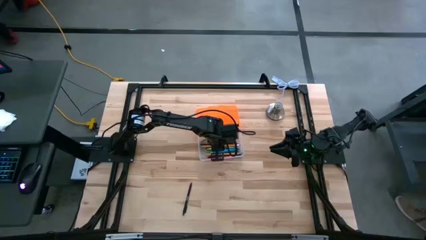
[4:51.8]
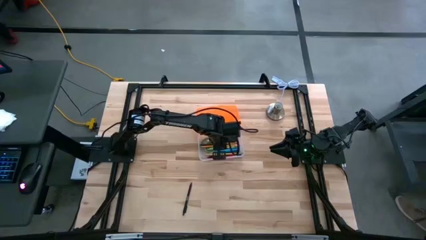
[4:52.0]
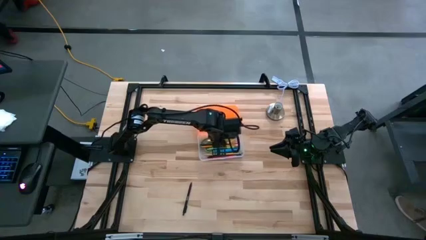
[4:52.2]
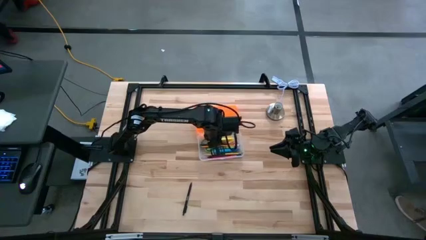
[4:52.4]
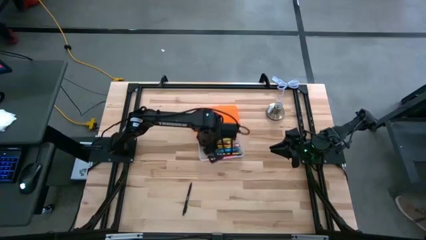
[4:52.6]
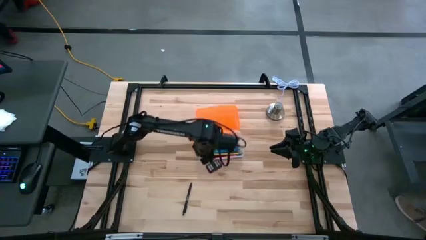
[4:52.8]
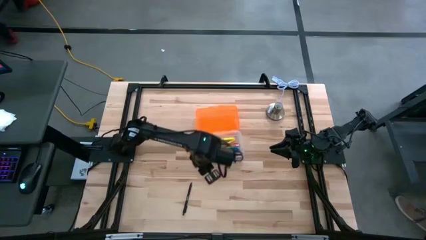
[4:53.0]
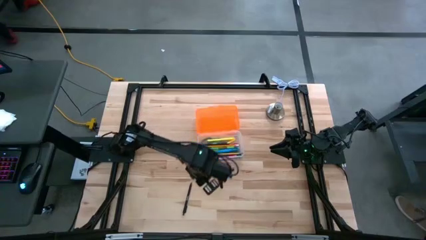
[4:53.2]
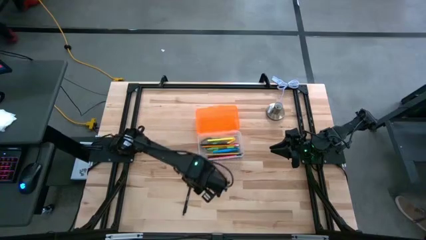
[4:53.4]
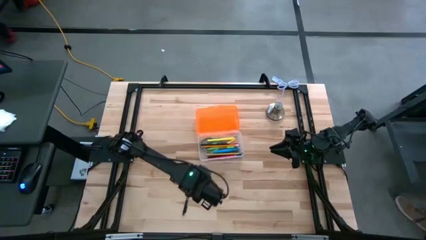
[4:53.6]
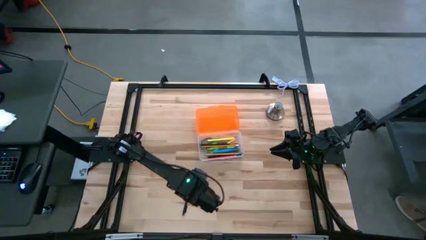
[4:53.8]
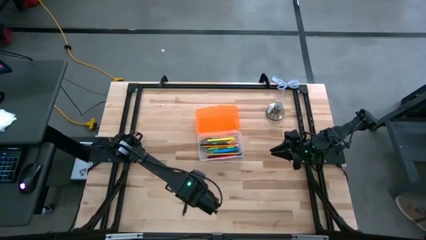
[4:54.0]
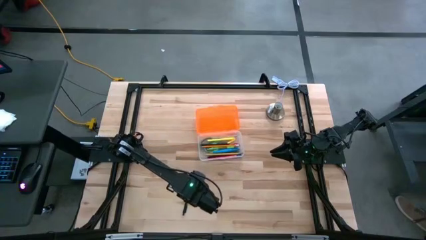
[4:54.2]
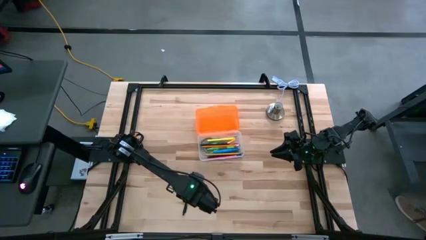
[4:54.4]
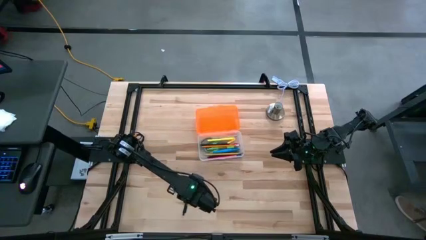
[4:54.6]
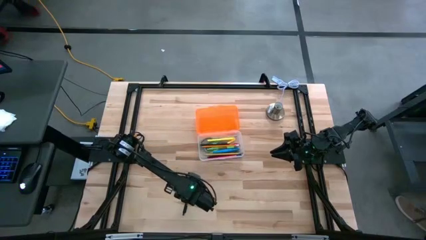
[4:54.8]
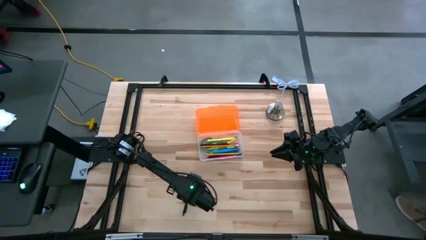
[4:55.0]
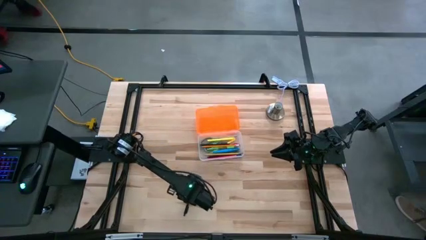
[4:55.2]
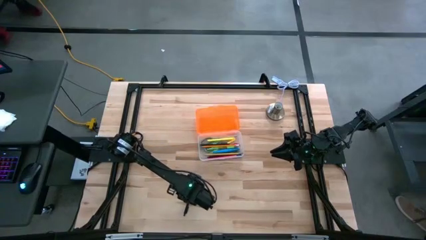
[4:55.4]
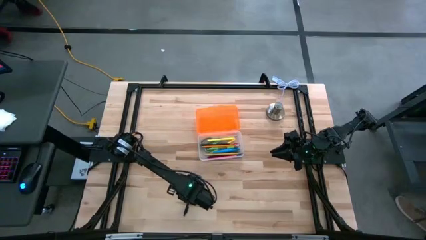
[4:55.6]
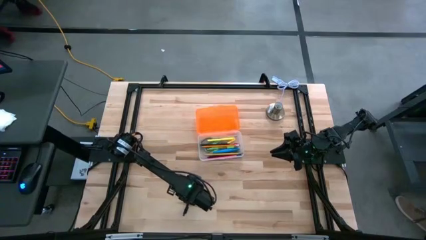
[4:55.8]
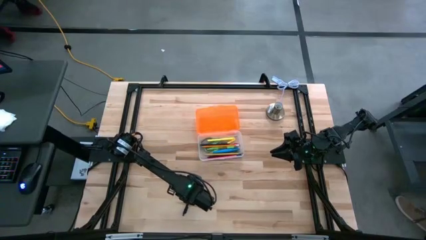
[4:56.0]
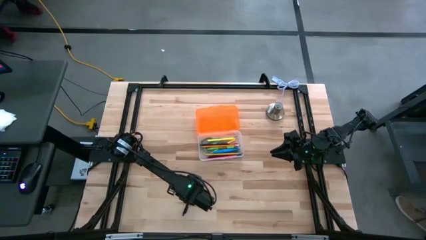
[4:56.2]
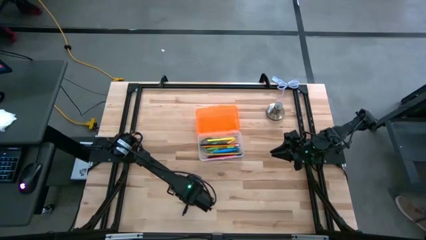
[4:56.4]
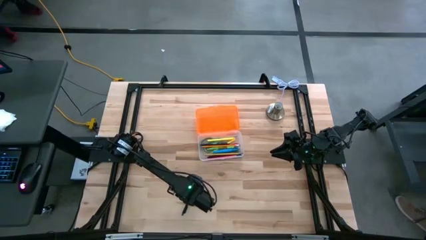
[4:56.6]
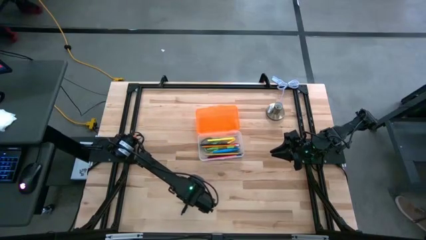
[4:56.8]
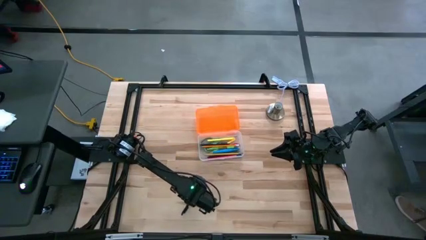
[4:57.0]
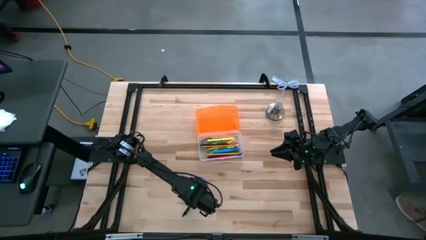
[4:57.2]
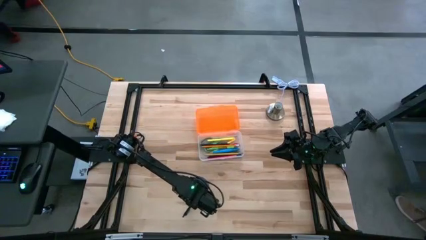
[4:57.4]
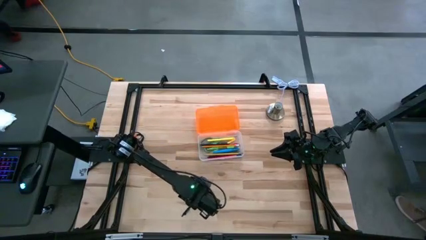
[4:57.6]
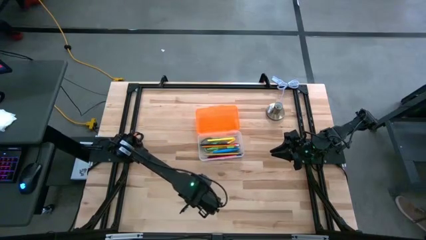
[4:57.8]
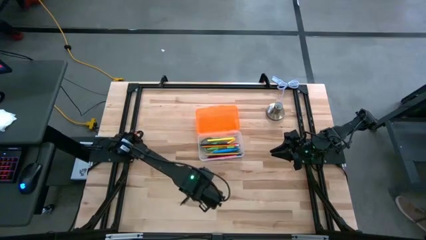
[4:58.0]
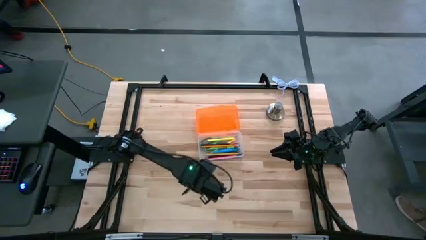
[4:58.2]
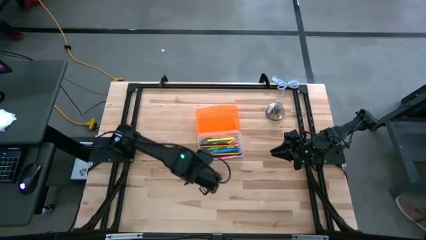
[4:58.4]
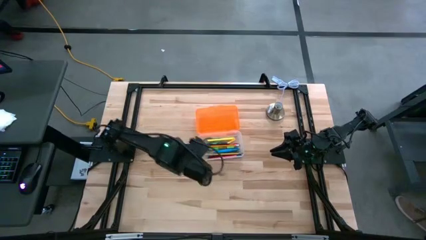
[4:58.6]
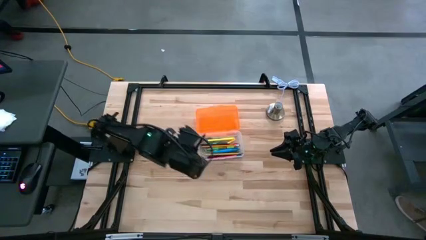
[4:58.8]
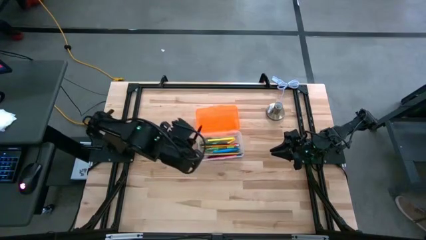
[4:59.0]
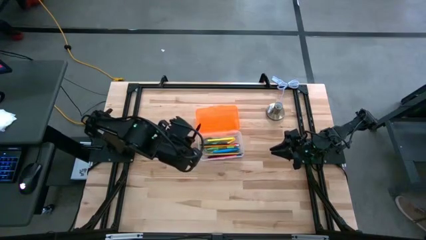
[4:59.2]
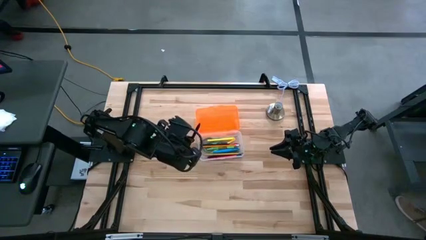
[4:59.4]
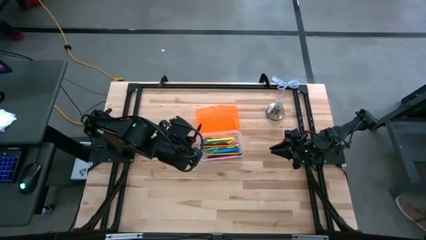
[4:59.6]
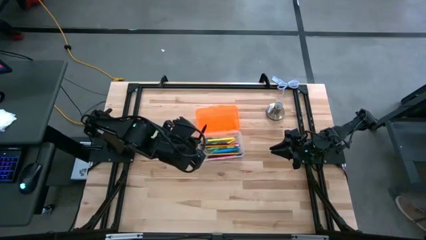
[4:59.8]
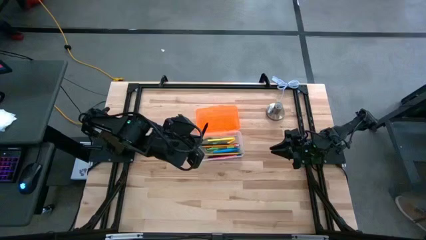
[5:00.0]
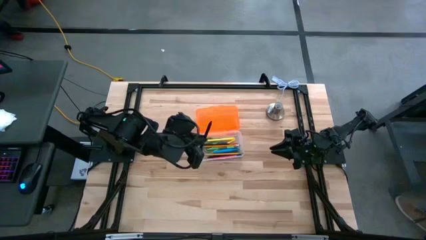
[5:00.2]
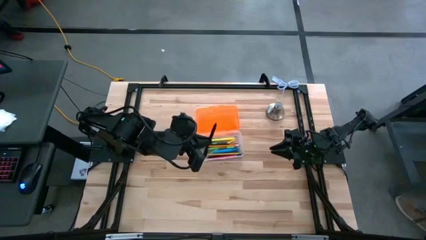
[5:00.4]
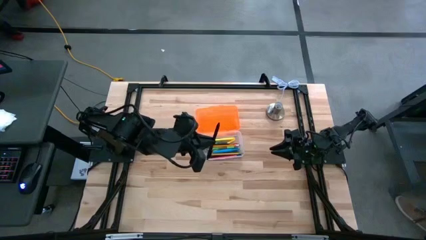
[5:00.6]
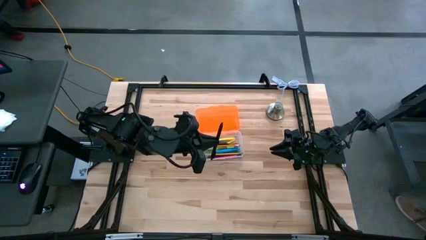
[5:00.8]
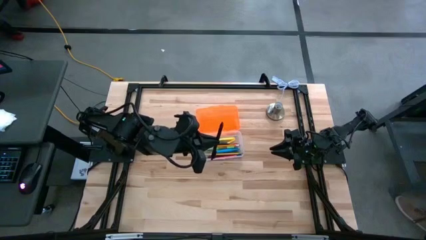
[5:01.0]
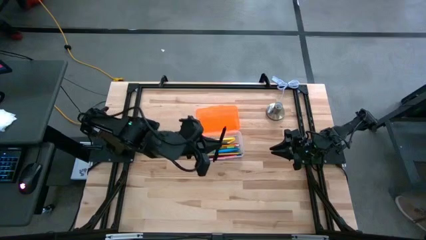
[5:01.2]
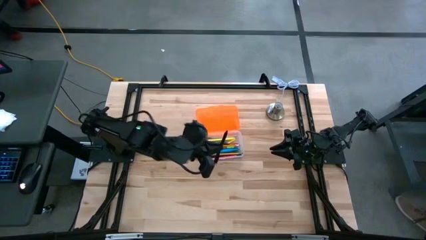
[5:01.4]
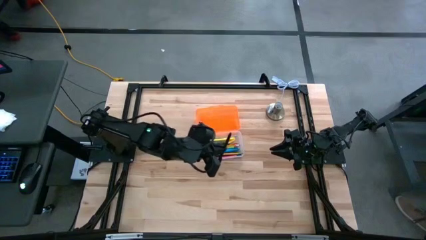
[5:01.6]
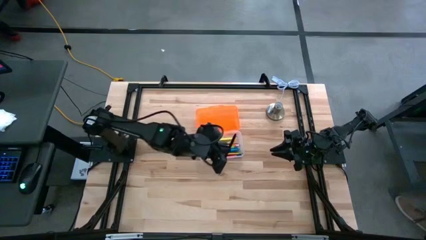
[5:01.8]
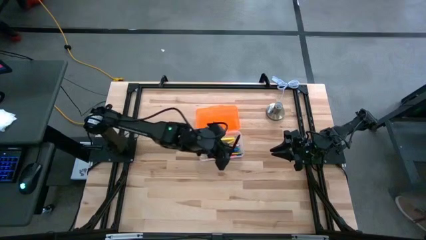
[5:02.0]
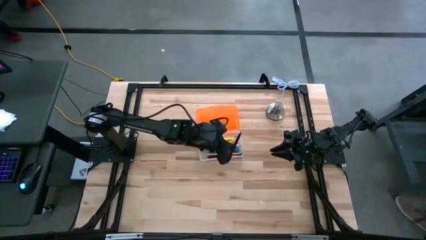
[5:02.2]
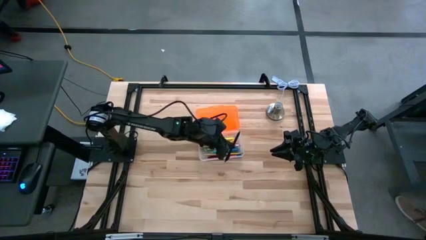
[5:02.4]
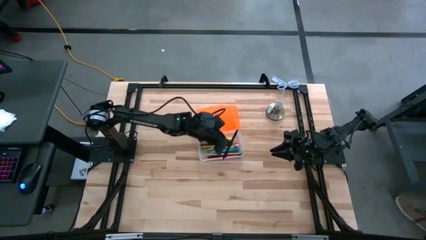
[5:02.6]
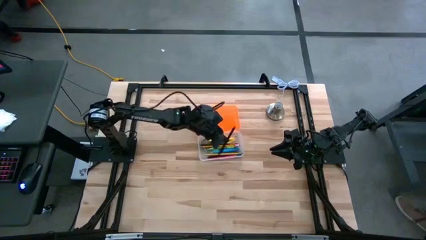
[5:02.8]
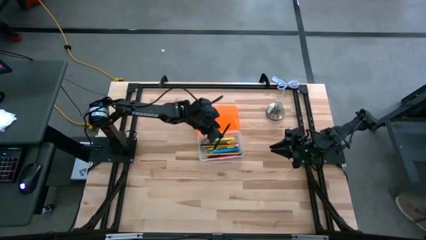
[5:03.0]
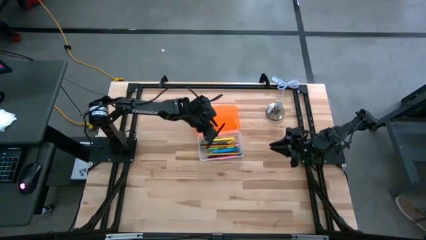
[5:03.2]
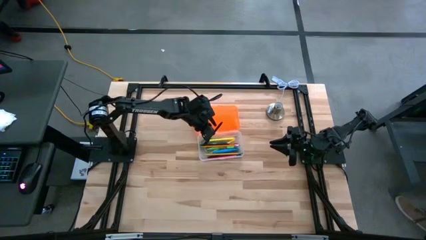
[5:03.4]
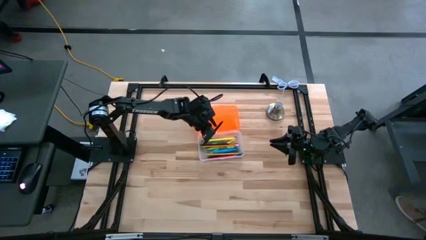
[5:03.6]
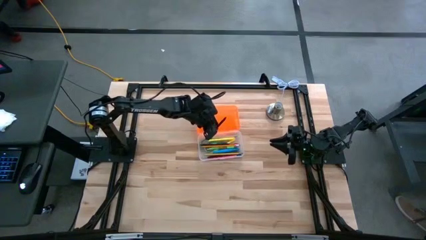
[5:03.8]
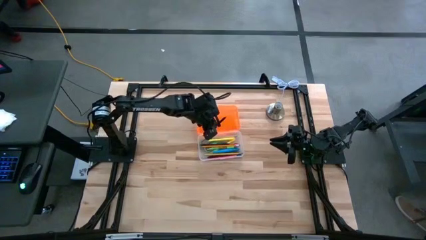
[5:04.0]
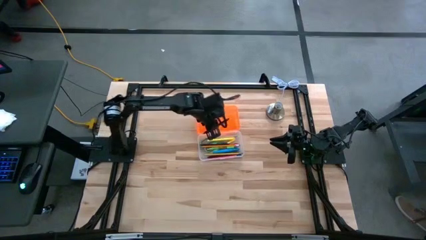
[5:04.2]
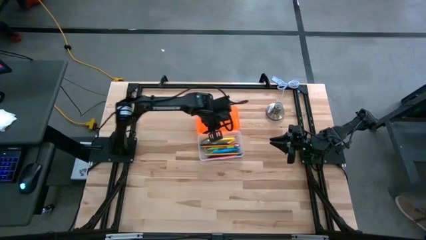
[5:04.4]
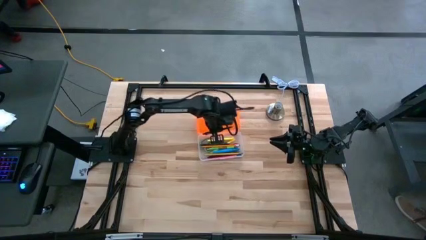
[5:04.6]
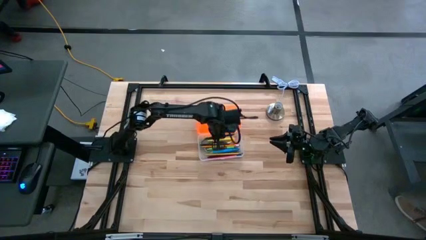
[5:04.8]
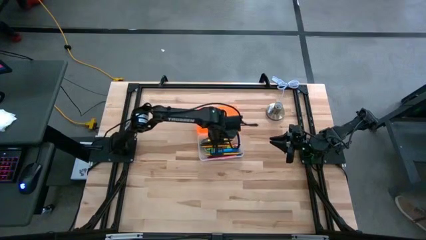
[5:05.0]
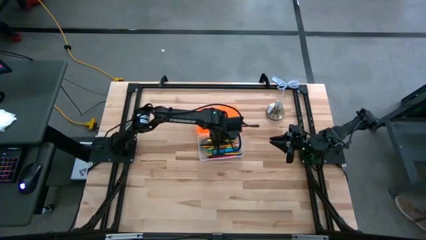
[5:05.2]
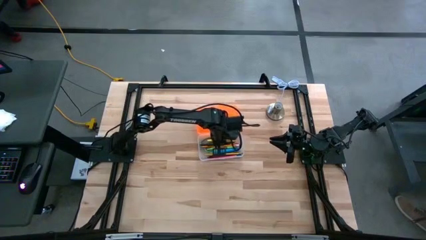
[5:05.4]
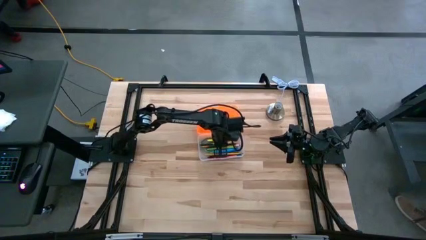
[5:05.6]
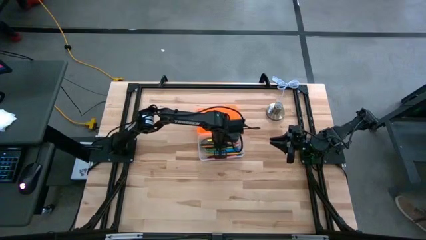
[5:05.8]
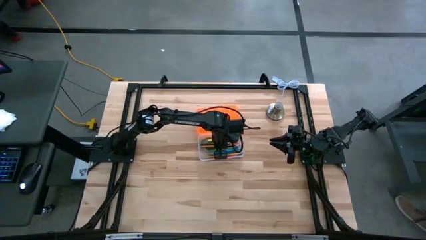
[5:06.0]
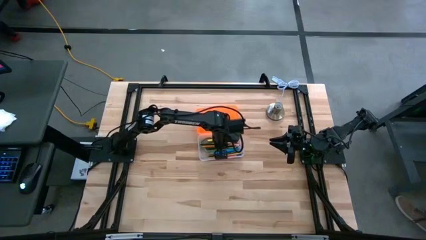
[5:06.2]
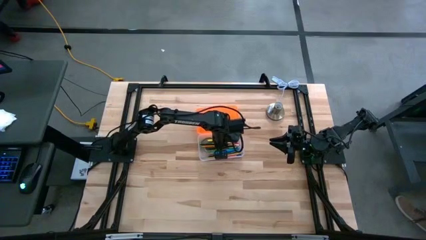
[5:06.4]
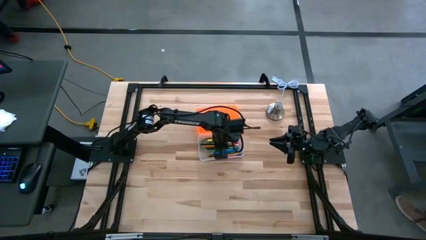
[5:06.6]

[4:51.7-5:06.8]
Task: Pick & place school supplies into a supply box
Put the black pen into the container
